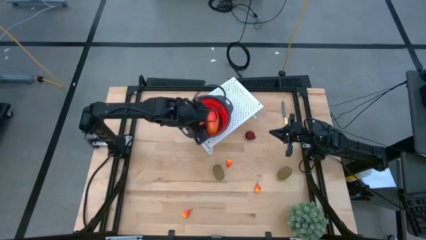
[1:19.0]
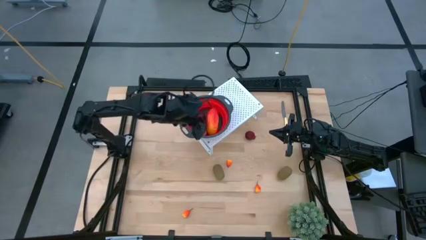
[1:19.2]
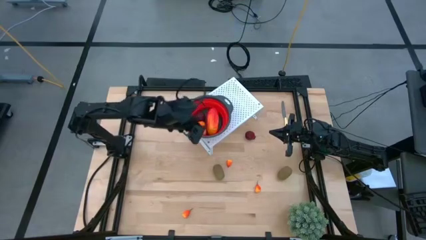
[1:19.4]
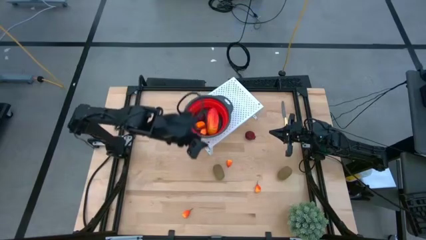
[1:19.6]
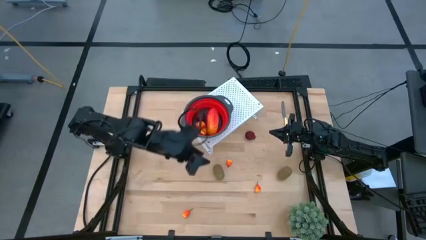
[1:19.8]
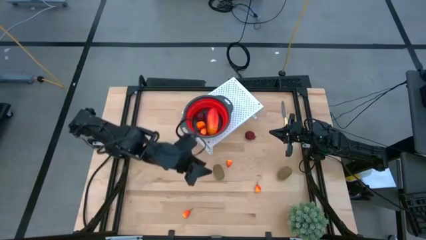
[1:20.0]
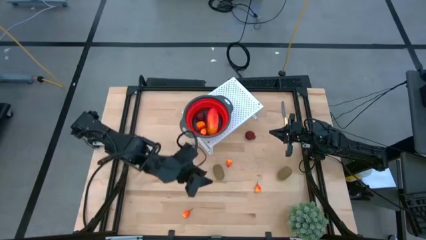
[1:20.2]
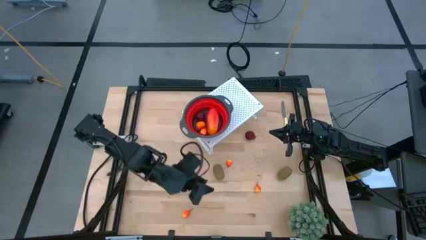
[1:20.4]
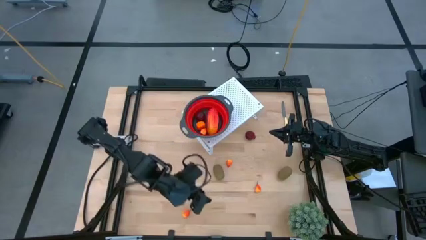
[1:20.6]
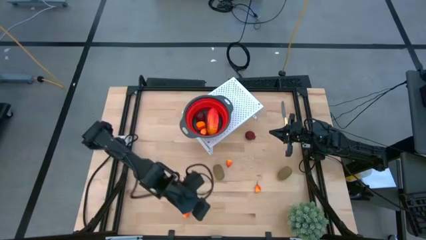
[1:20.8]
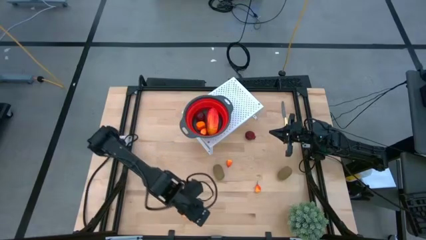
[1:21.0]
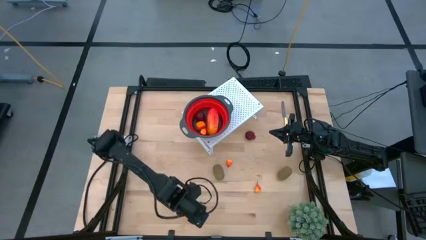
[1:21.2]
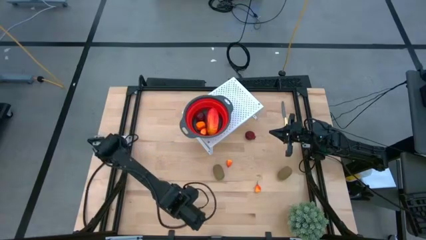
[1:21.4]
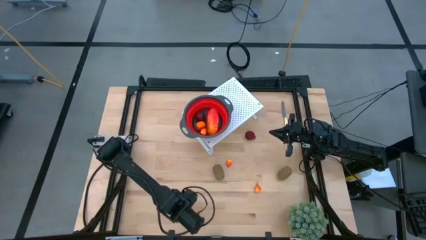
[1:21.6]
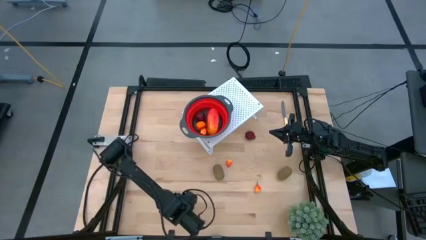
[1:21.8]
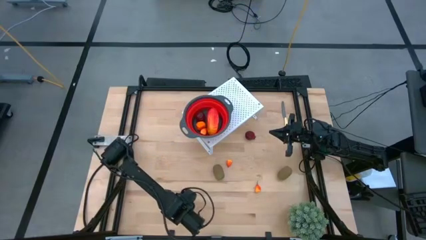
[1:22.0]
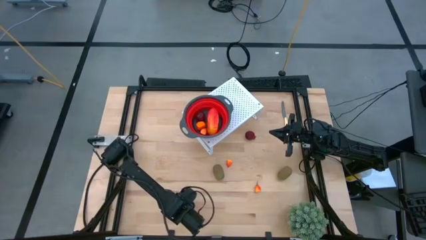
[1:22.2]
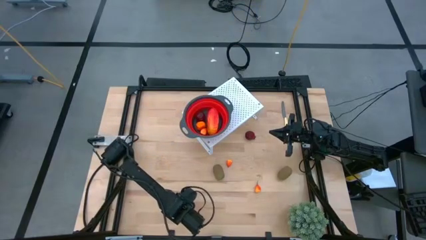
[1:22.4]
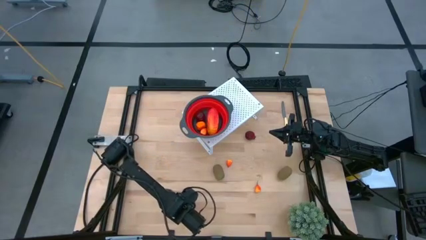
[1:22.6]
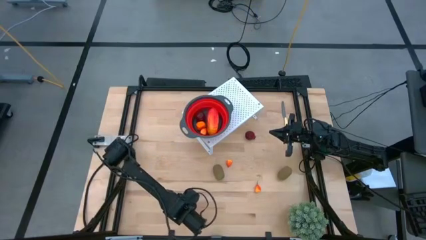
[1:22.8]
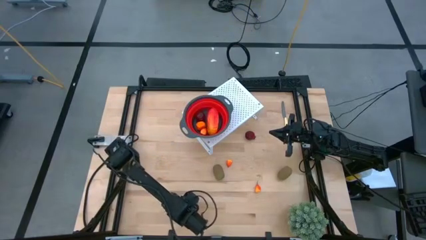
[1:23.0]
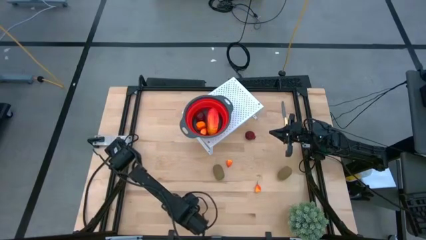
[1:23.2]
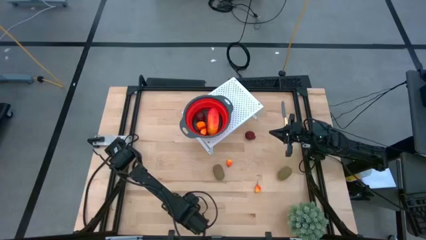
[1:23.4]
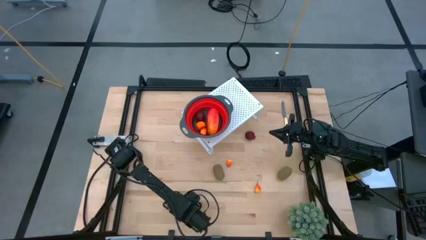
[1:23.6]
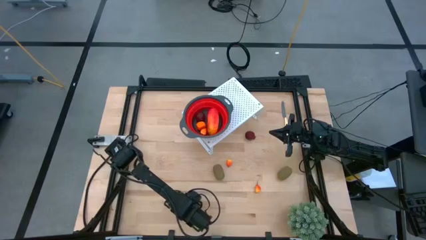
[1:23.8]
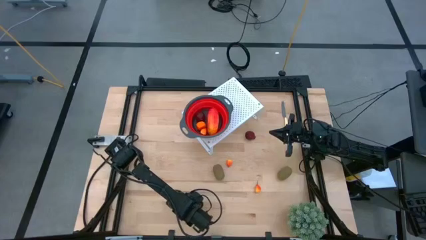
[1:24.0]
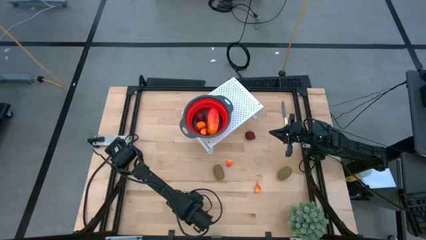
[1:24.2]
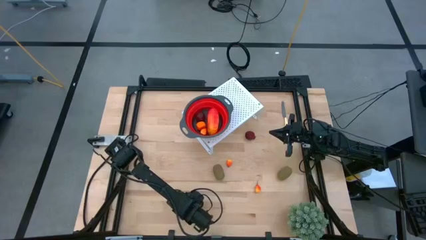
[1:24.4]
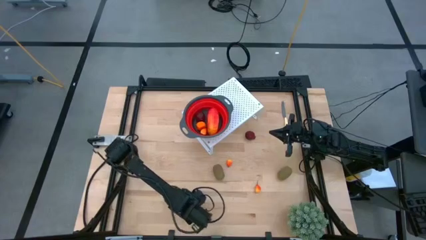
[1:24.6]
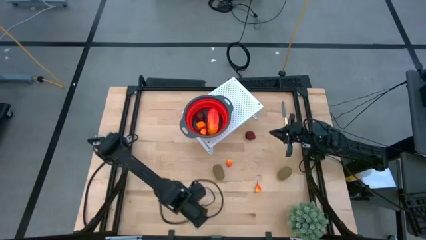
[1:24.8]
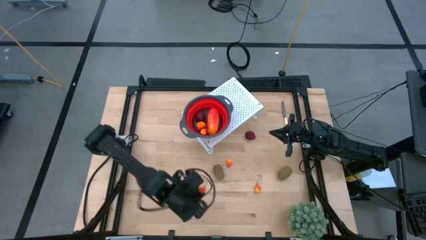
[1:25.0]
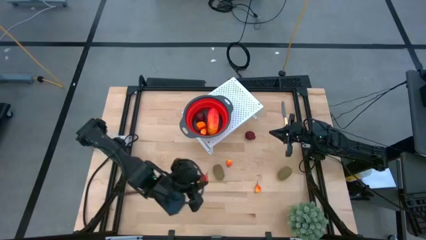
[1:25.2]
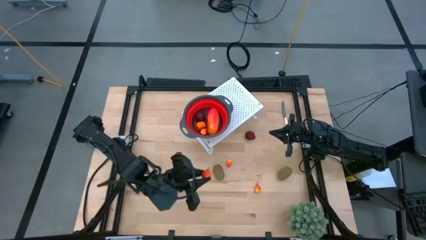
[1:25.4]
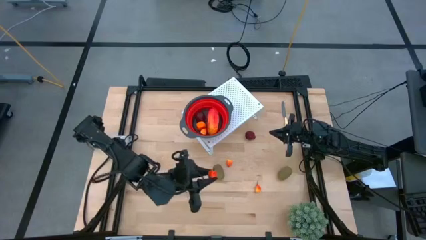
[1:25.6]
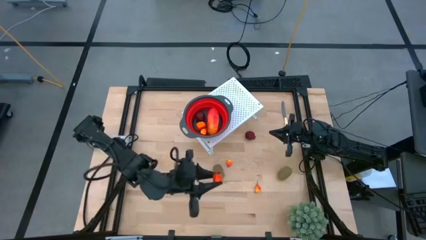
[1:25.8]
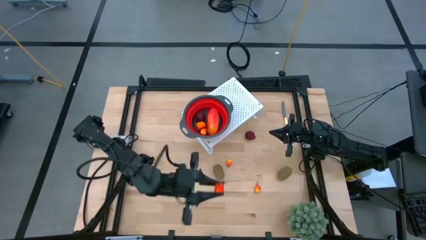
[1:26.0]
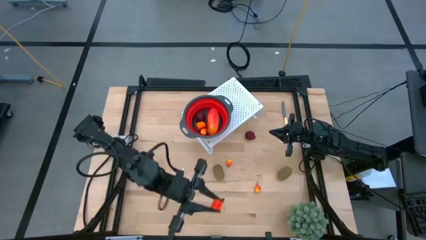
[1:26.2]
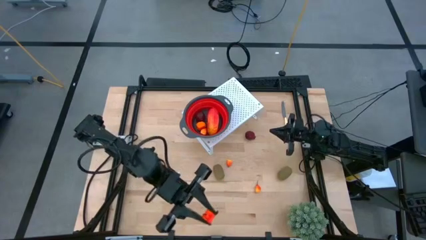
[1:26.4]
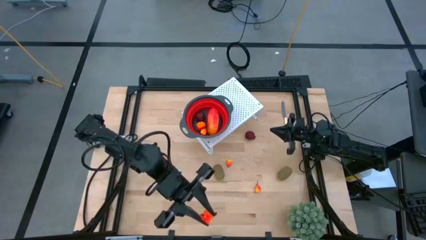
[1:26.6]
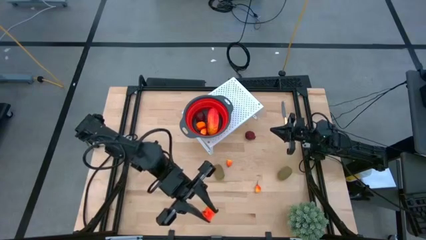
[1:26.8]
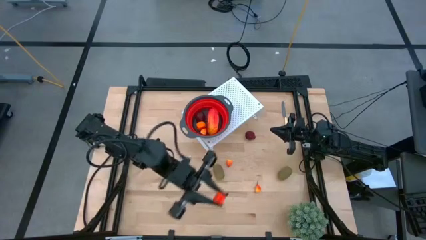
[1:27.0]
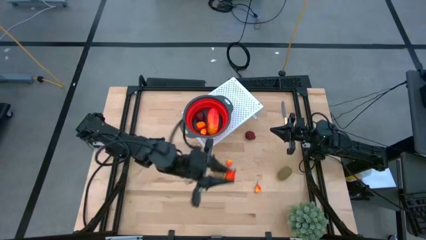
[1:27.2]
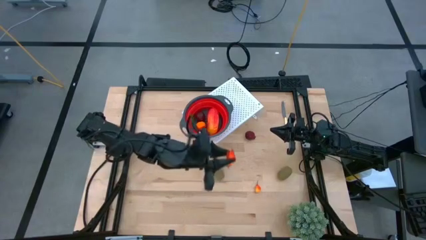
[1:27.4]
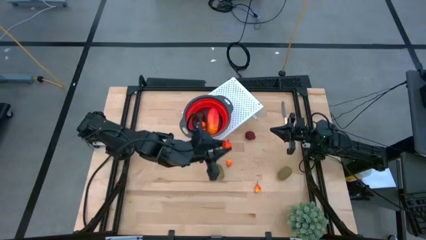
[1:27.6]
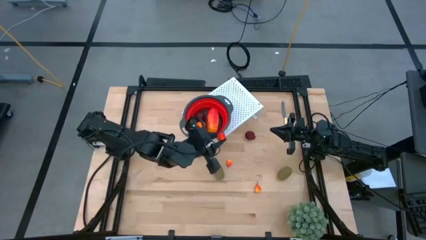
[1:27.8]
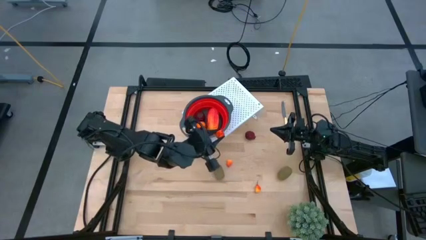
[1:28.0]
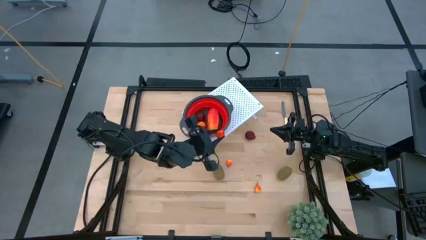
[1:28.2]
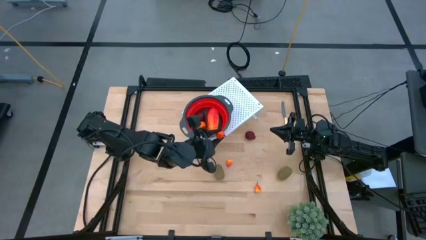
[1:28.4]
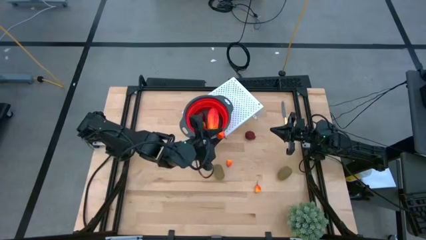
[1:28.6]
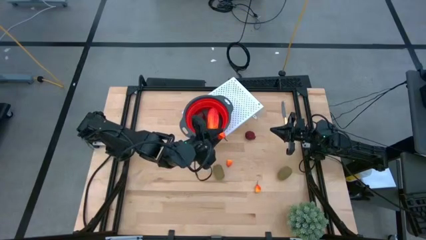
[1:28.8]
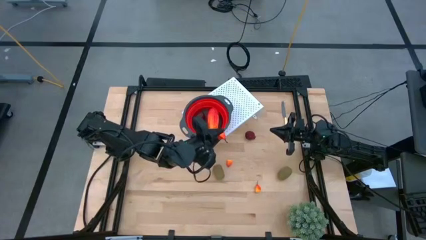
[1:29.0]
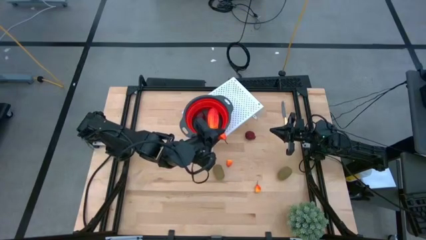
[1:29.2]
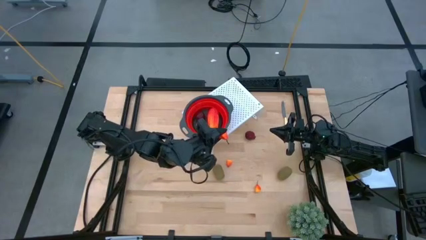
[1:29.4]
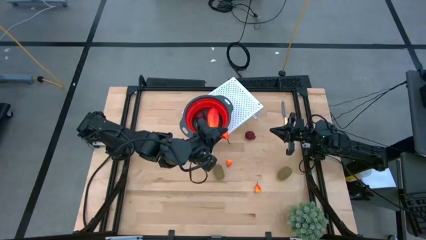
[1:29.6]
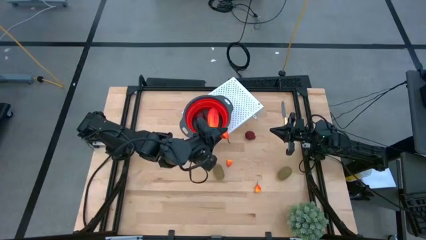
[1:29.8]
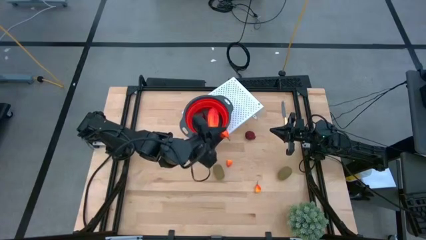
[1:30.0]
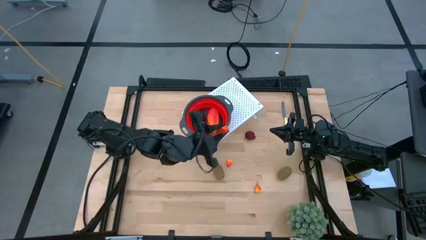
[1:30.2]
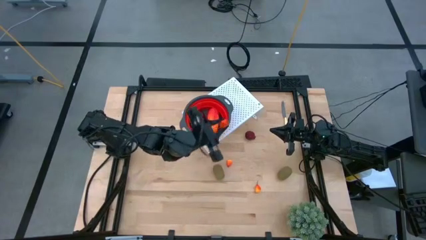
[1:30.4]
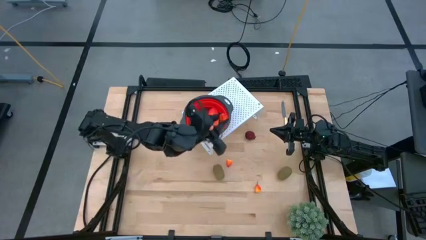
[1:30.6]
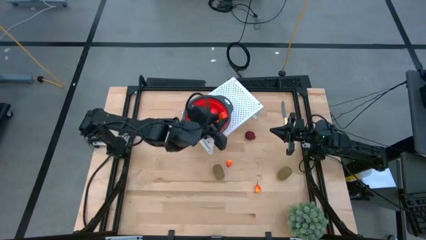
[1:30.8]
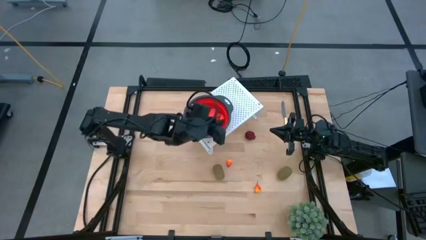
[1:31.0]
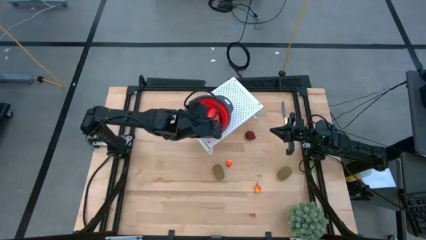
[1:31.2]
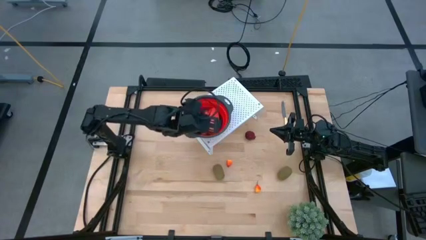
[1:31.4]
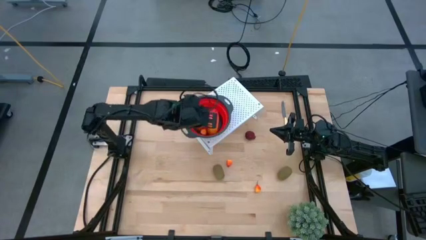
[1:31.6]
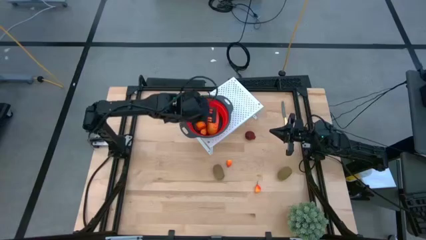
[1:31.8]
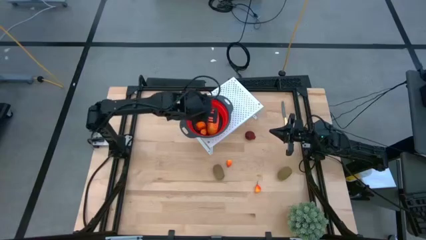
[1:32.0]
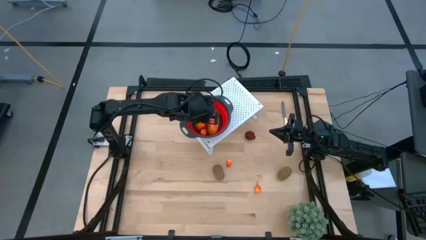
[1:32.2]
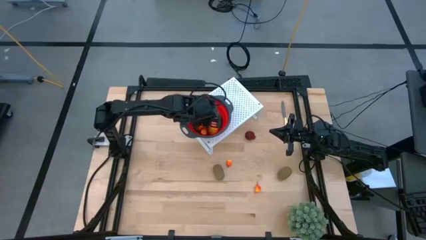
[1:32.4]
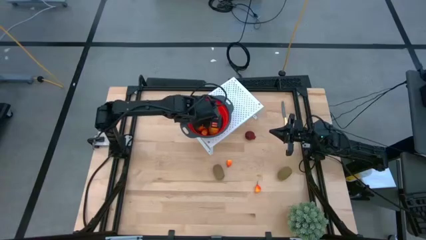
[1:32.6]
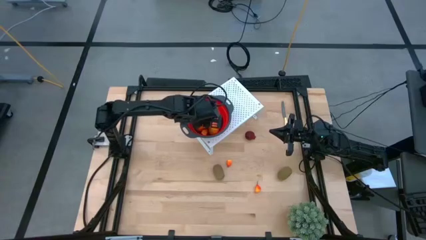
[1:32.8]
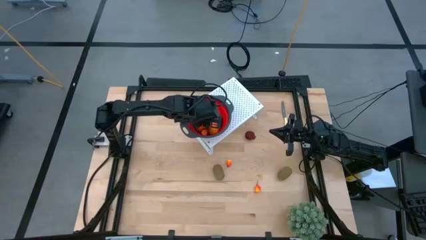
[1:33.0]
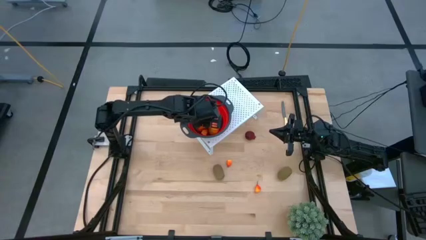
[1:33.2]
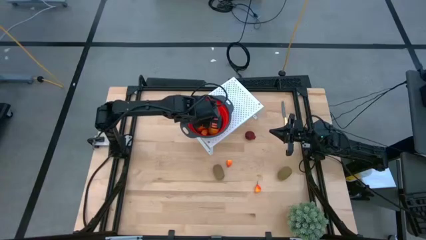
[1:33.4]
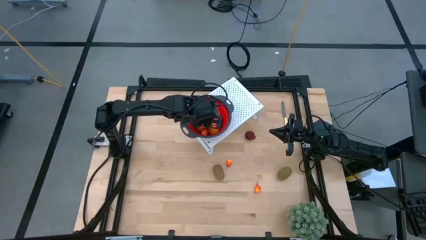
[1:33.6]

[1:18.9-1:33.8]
Task: Pick & Place Fruit
Put the pear into the red strainer bowl on the shelf

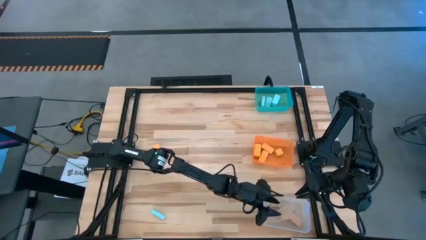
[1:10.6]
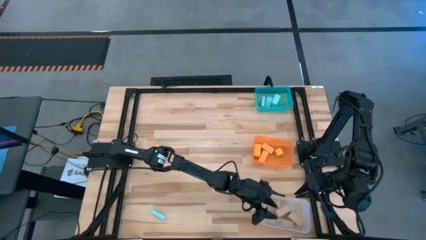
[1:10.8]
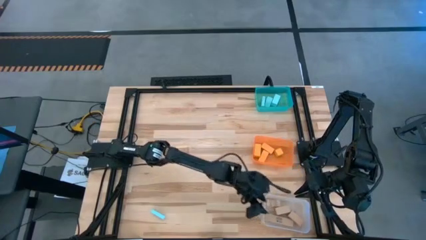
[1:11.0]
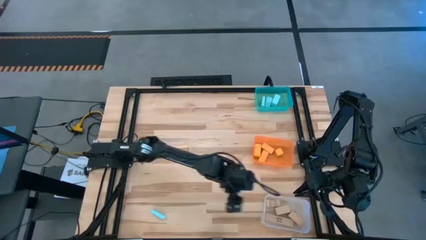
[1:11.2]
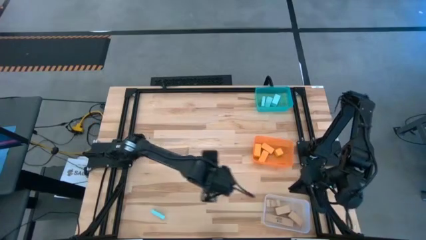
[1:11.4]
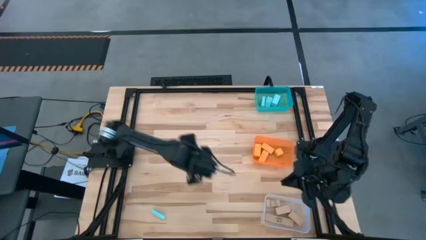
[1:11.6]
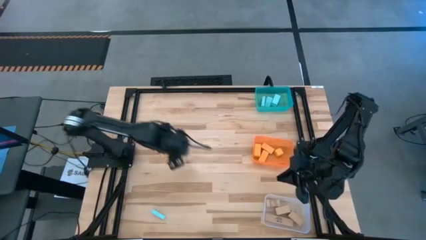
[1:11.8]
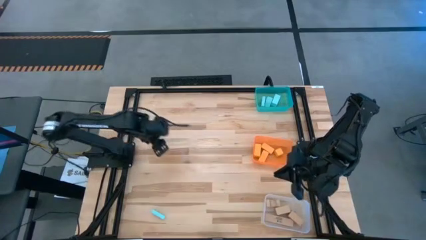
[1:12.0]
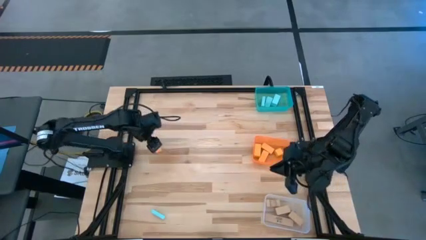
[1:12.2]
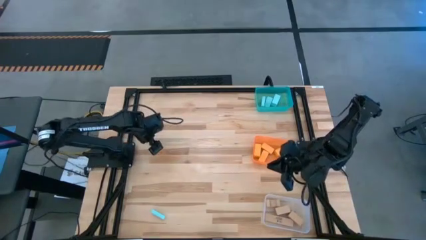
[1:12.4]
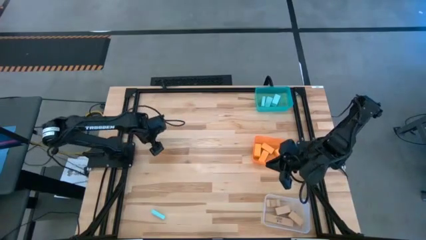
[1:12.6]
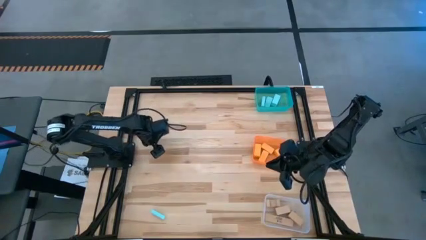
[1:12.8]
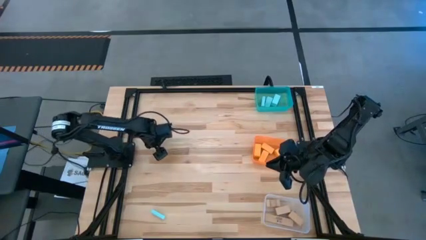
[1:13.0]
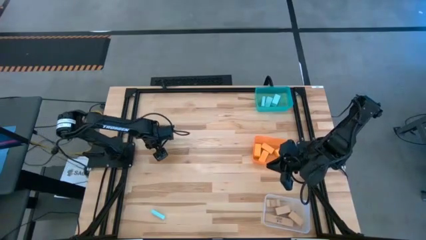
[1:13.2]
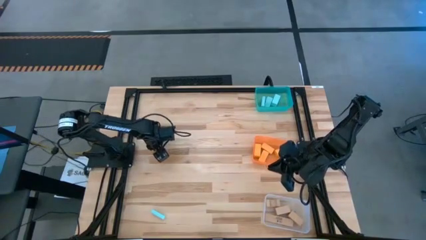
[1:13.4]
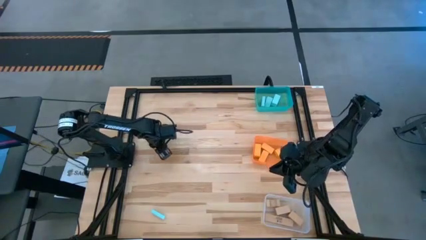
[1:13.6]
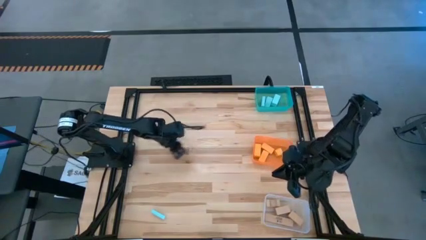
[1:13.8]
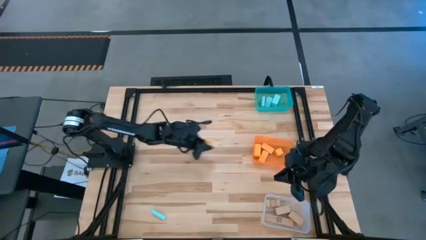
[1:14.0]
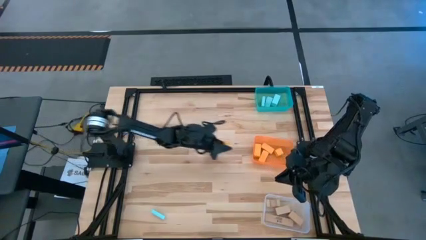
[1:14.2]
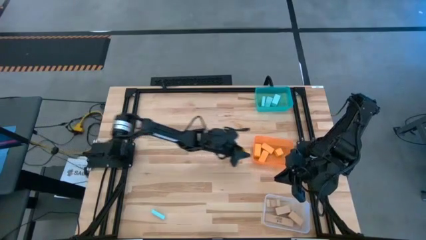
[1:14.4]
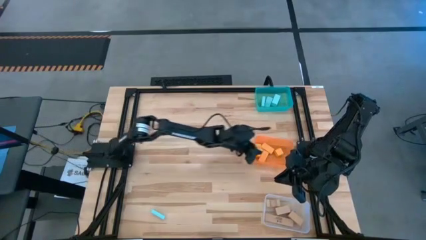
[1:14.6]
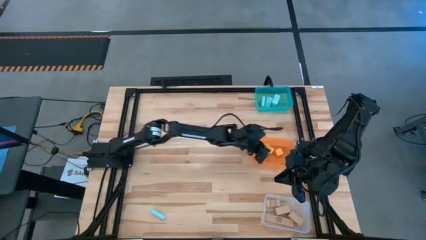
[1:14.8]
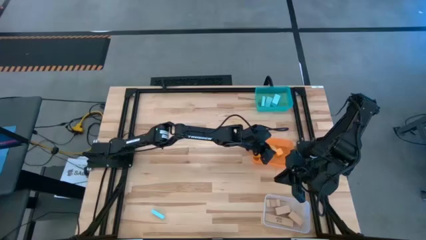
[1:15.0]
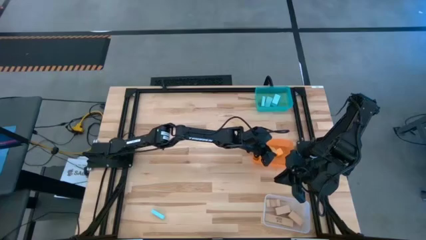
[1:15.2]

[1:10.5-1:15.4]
Task: Sort & place blocks by color
Put the orange block into the orange bin
